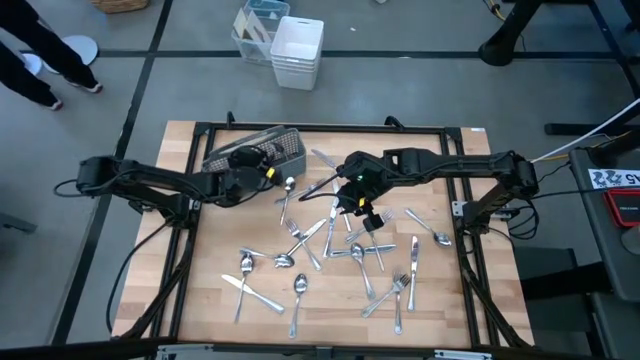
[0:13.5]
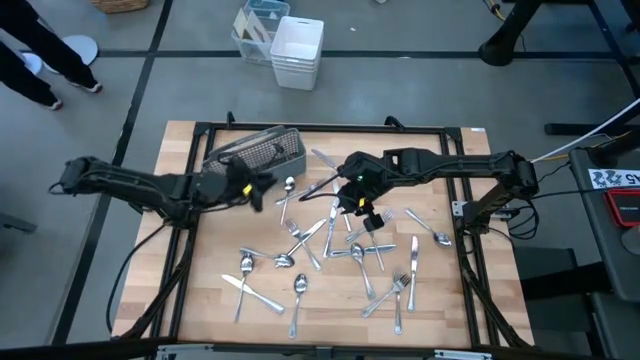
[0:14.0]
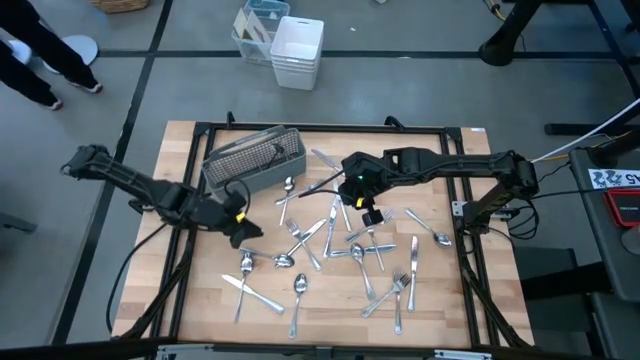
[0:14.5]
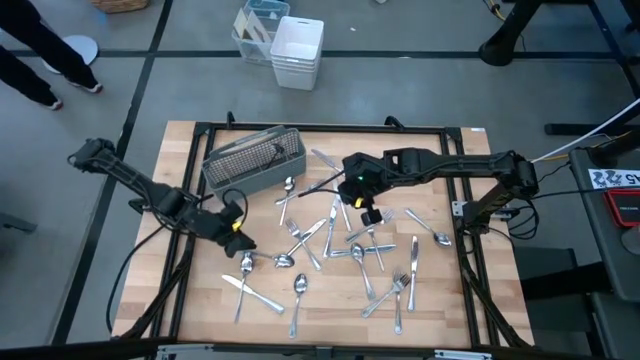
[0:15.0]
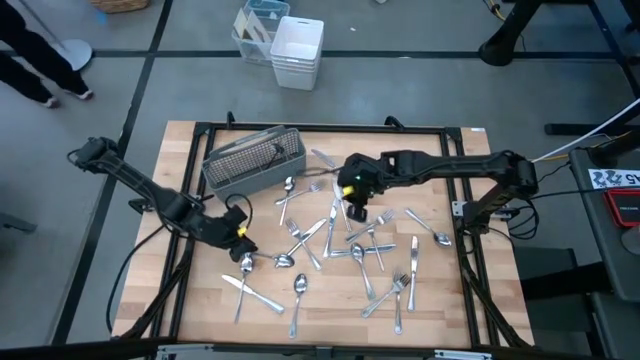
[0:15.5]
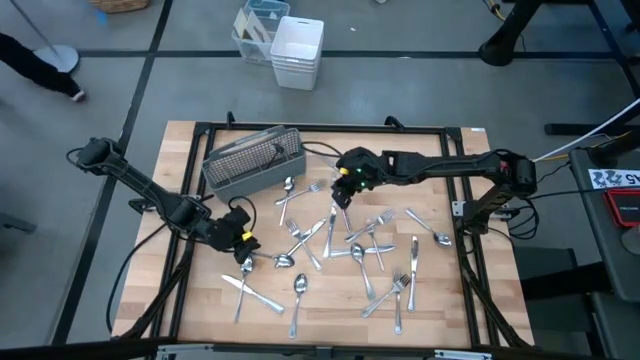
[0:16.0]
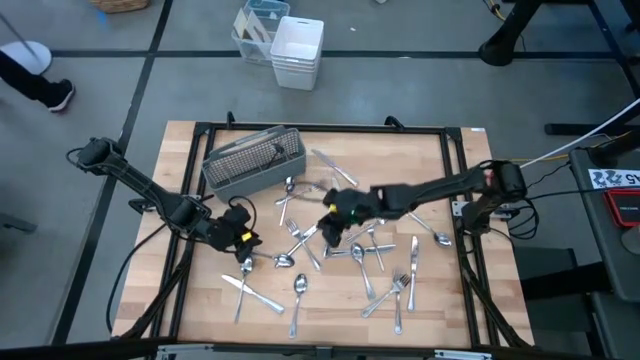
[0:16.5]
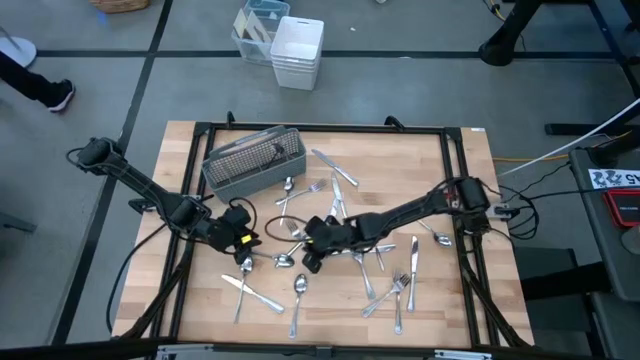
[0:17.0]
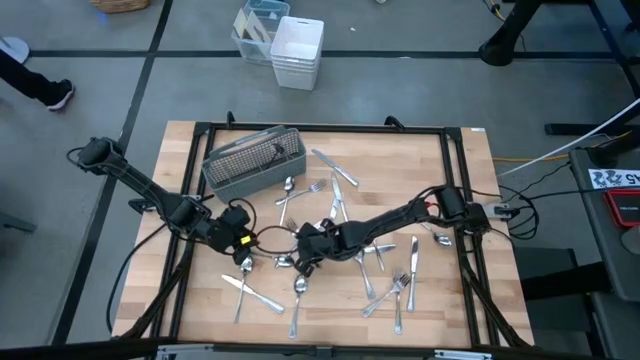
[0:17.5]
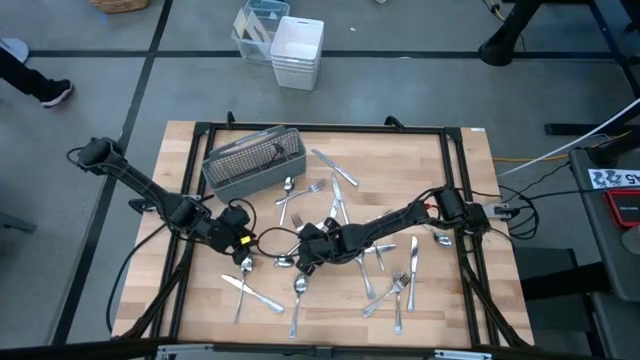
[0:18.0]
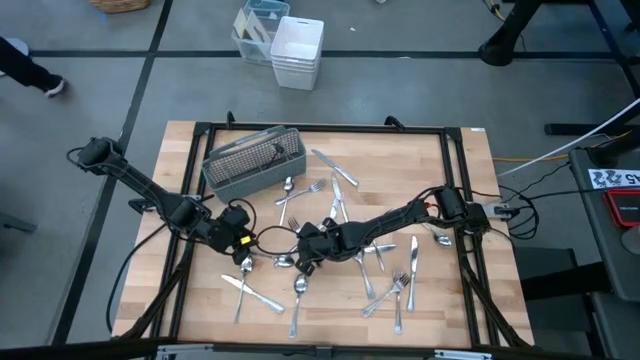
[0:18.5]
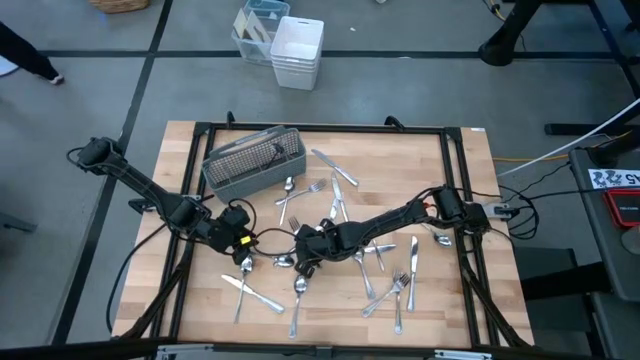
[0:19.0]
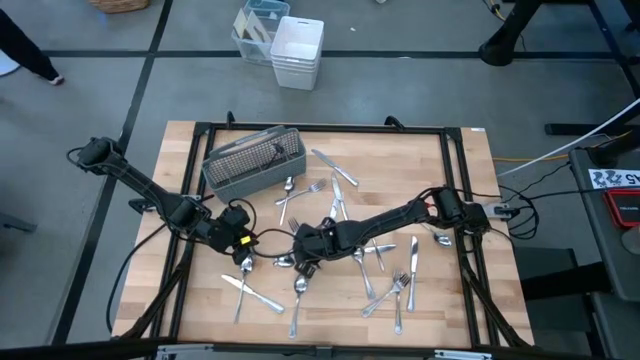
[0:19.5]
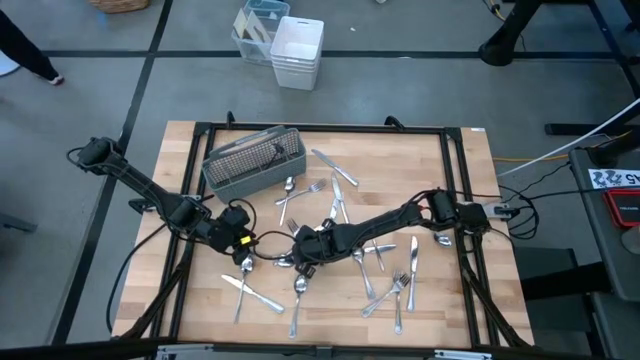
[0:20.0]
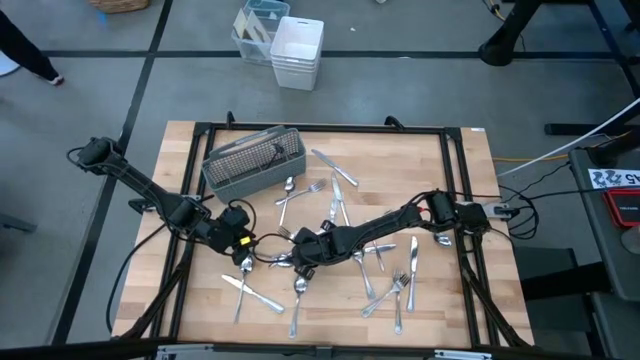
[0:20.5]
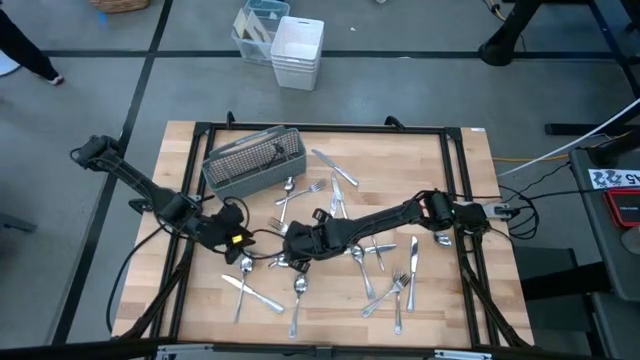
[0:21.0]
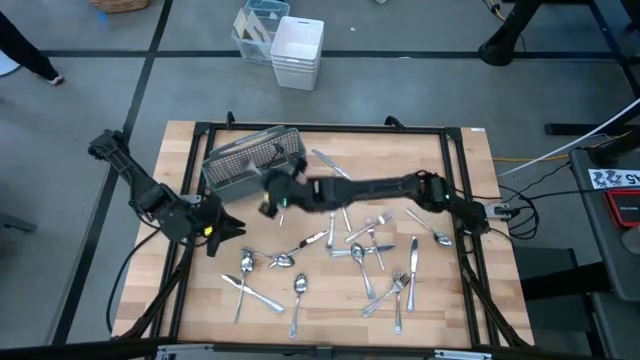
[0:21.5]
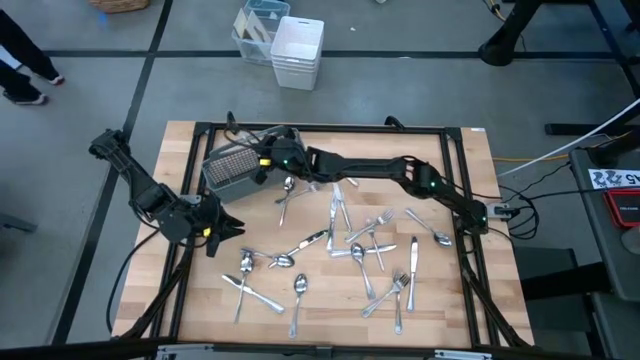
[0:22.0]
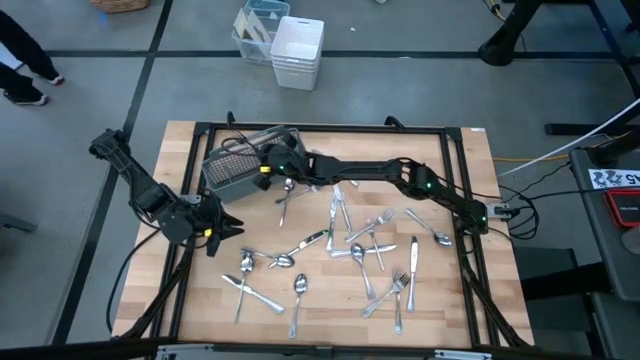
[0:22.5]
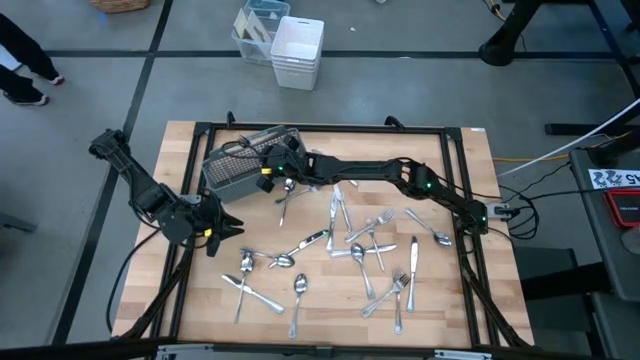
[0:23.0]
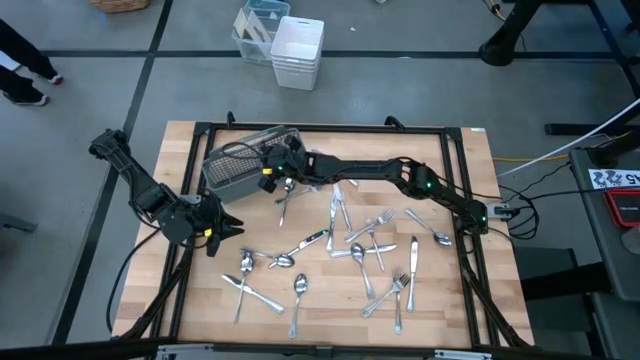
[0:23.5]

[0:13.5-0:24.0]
Task: Sort silverware
Put the silver fork into the silverware rack

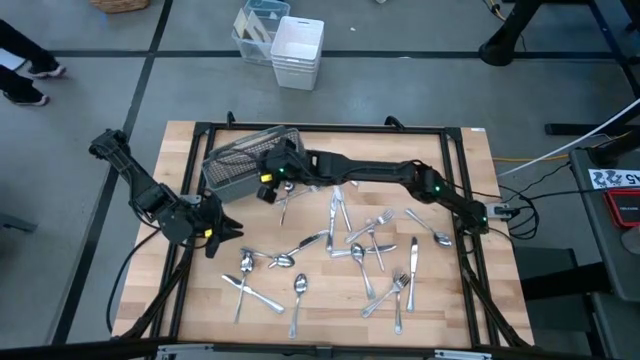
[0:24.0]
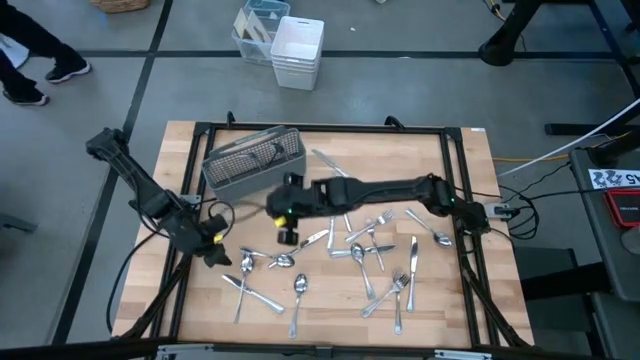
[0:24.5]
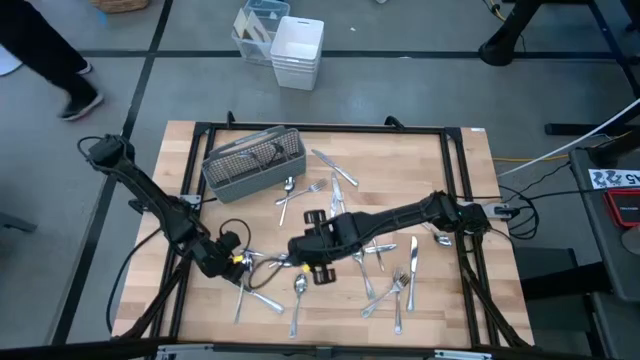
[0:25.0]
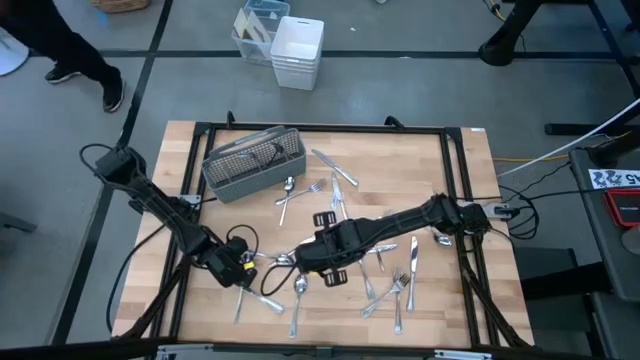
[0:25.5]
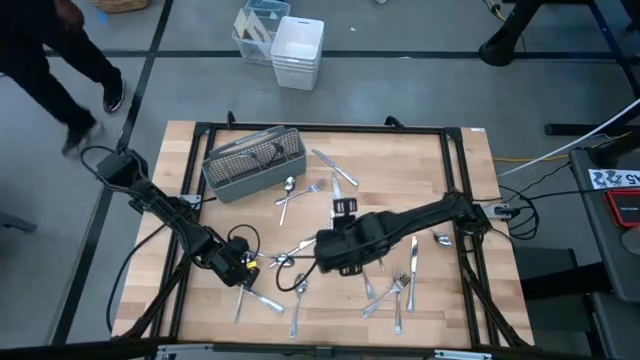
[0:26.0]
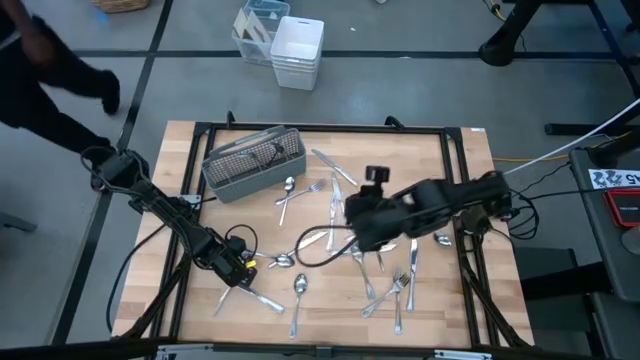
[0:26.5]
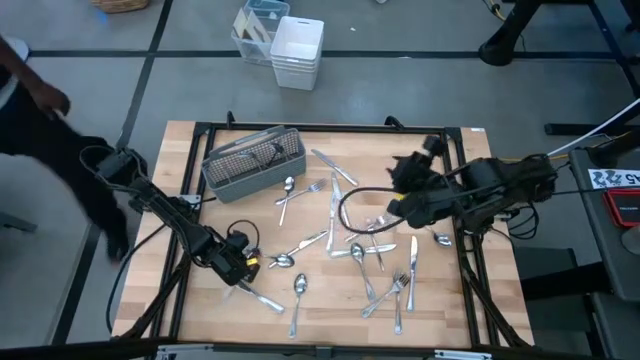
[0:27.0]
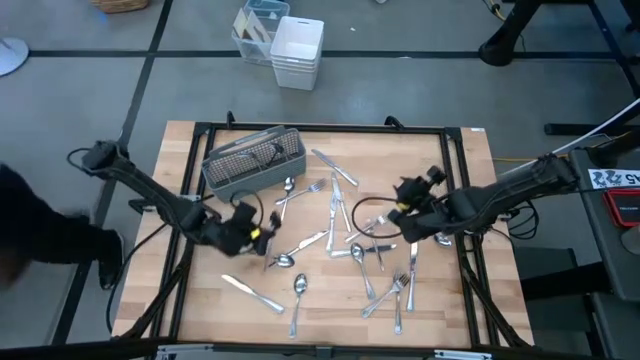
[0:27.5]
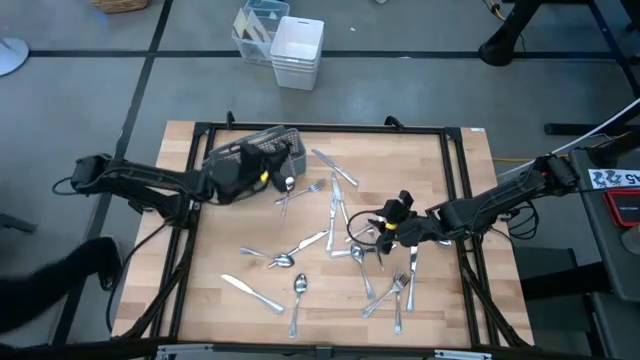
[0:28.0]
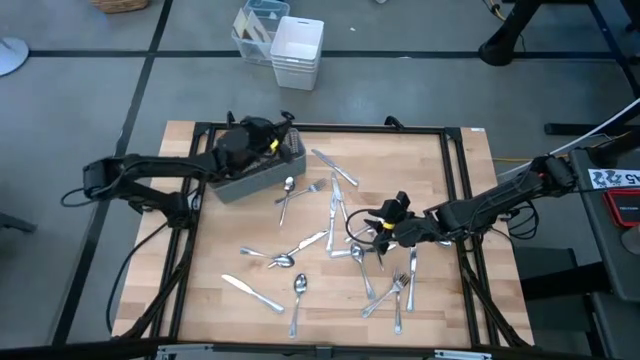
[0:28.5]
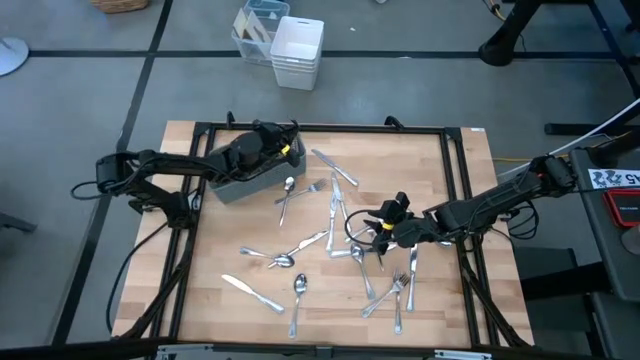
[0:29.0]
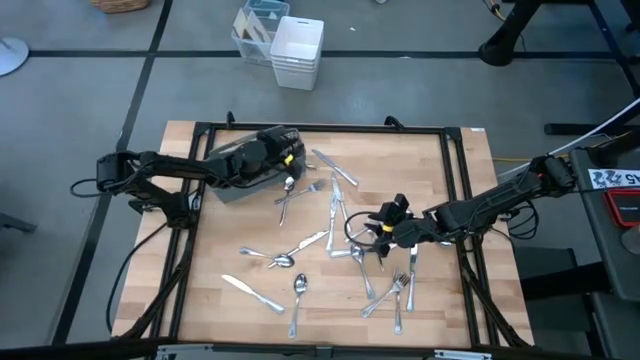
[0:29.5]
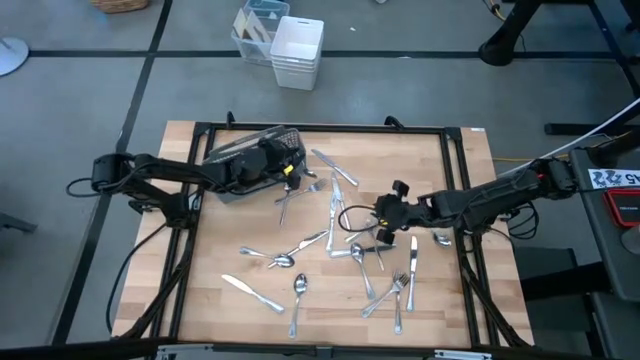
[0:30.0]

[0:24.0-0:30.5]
Put the silver spoon into the silverware rack

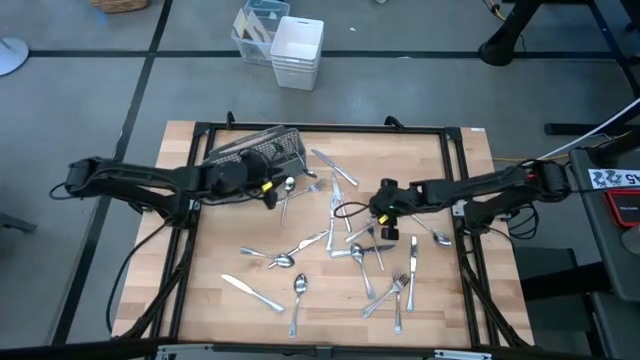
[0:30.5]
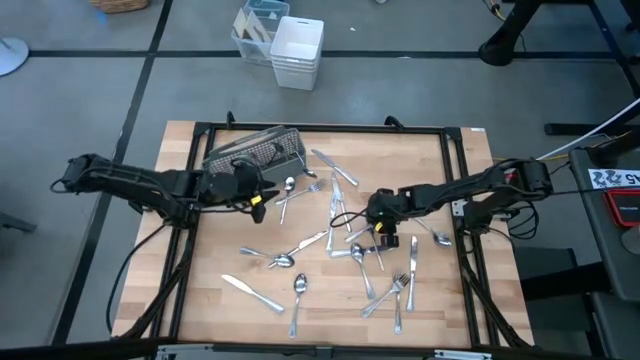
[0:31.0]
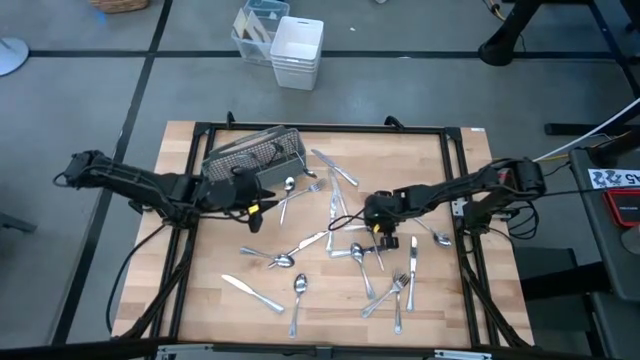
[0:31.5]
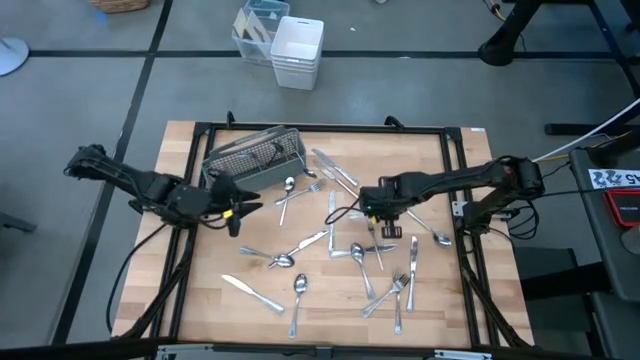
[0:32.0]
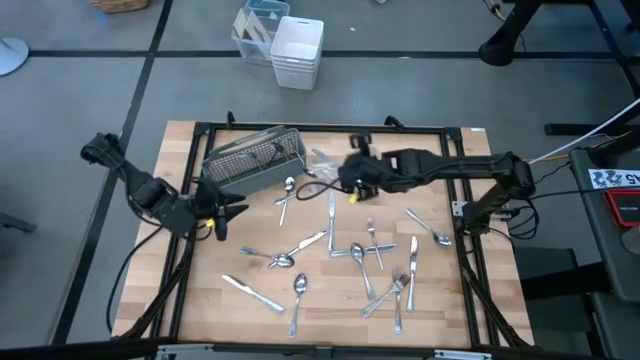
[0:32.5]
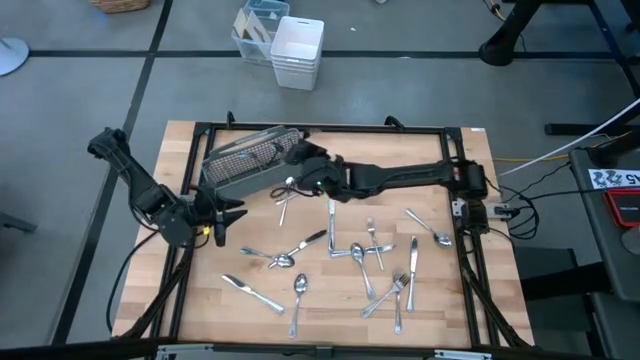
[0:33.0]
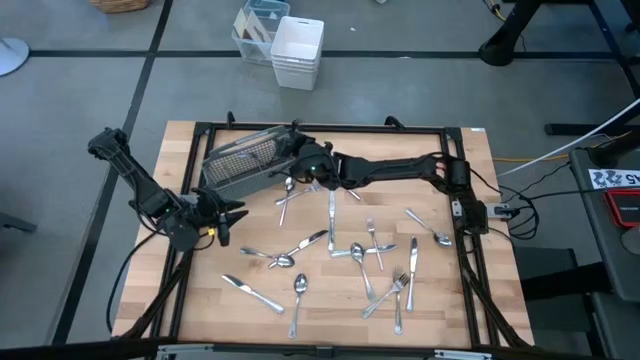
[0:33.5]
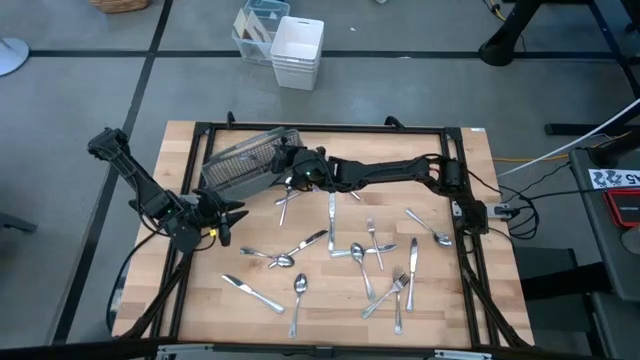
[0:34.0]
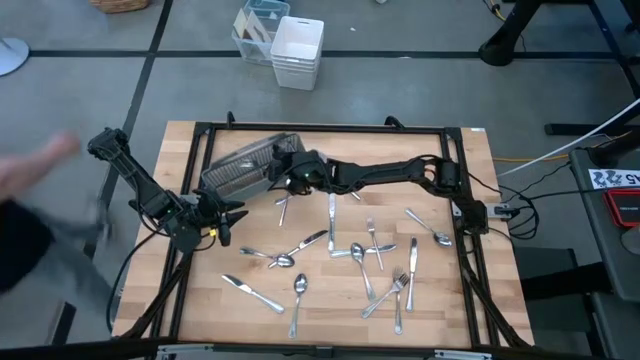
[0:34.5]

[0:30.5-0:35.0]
Put the silver fork into the silverware rack
